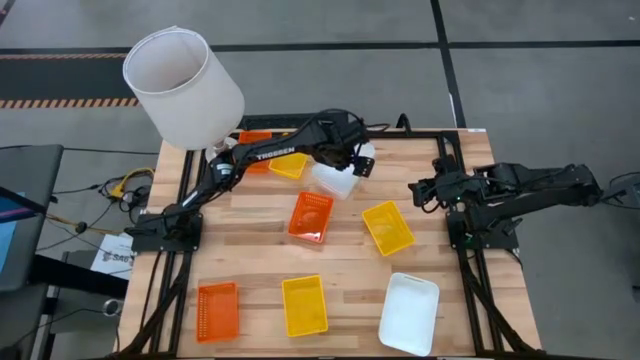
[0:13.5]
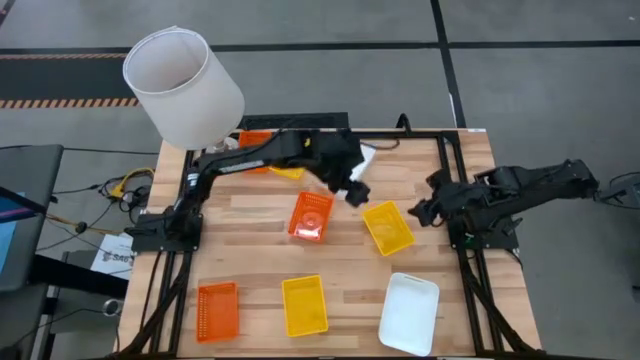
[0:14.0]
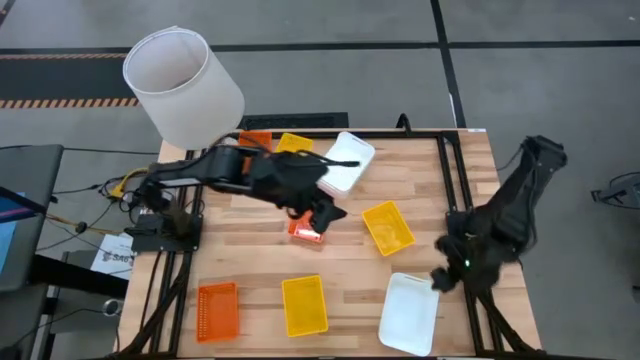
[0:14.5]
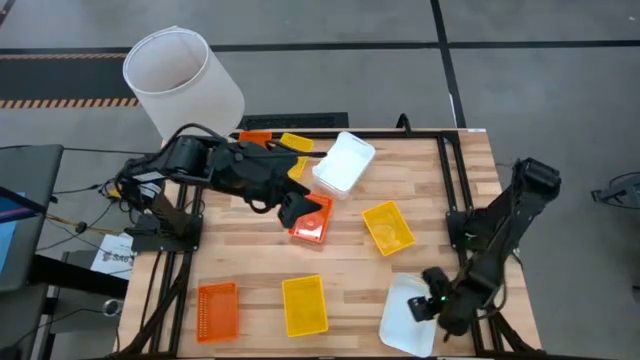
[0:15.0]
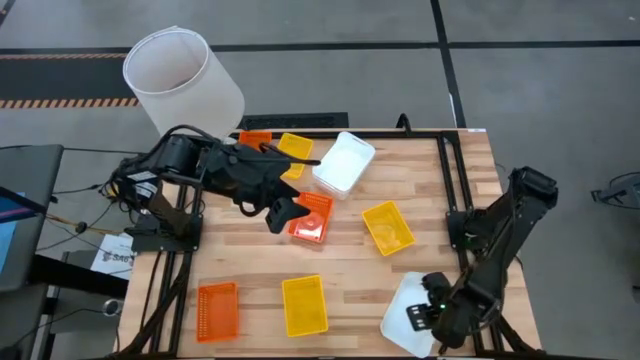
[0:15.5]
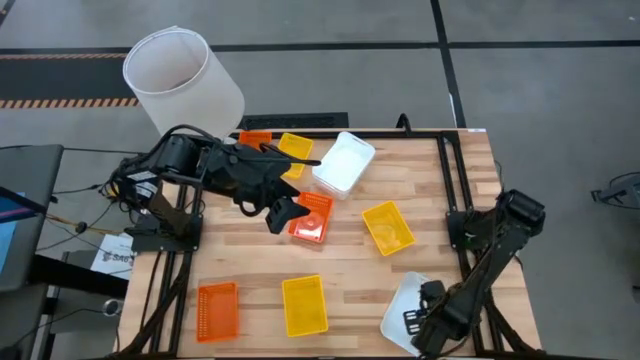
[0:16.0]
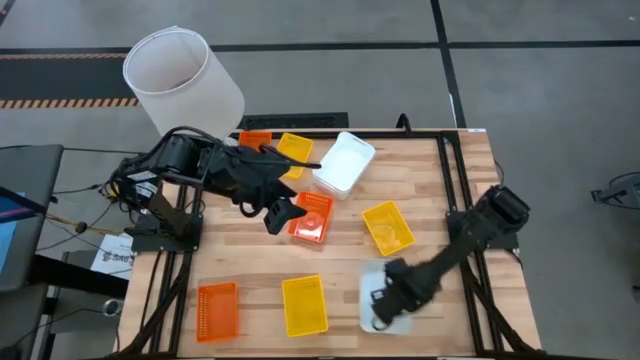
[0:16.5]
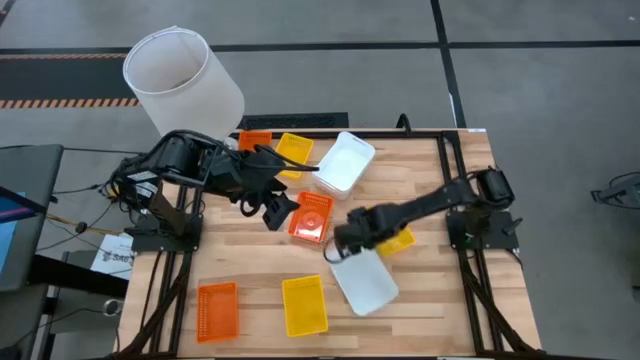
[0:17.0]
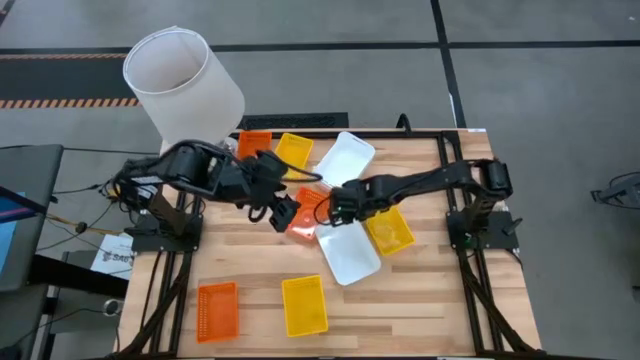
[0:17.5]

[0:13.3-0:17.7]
Move the bottom white bin to the center of the table

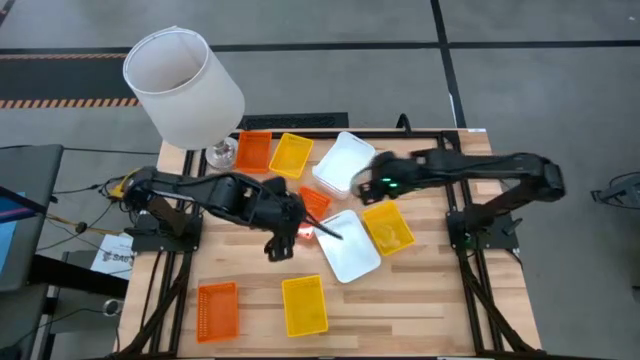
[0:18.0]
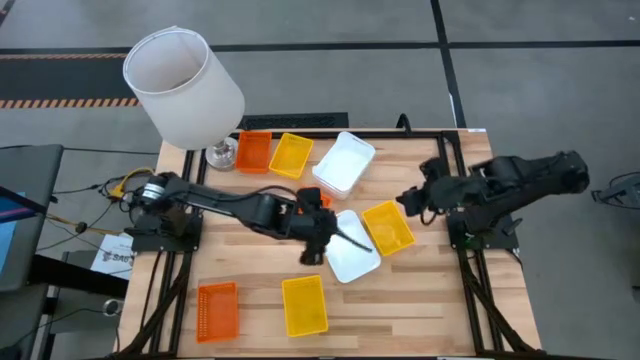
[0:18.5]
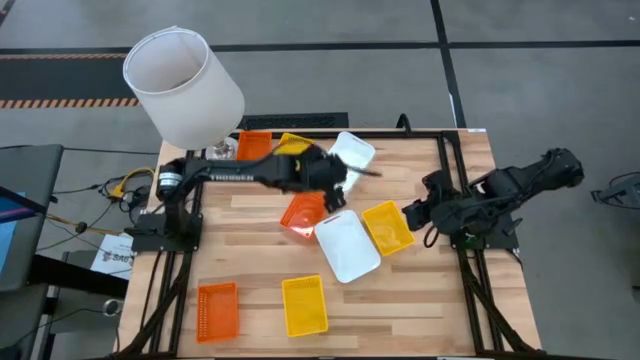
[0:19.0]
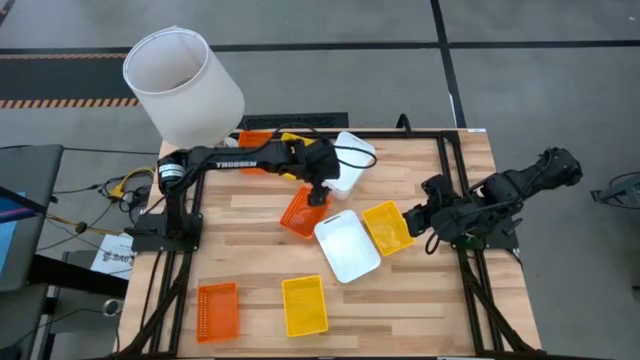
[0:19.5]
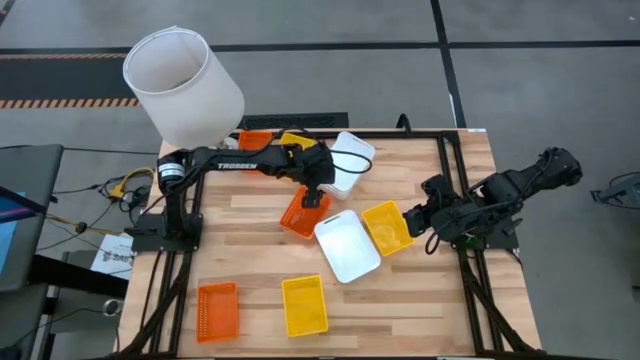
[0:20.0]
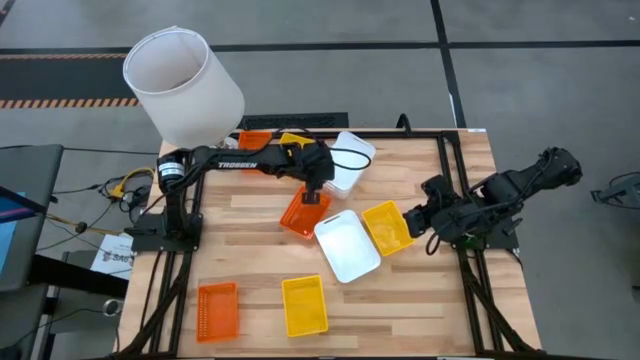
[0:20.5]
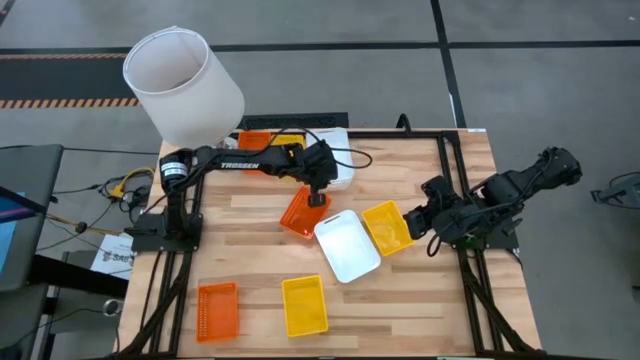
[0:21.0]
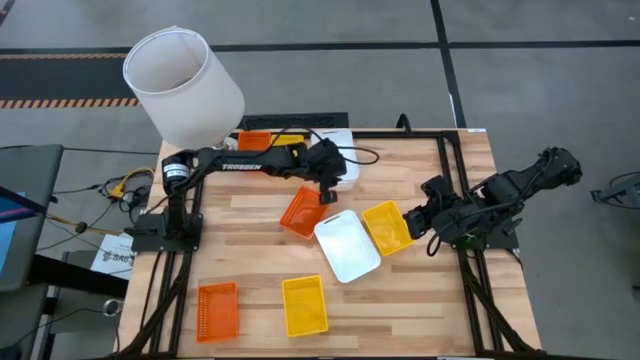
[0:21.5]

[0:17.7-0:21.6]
Adjust the stacked white bins on the table

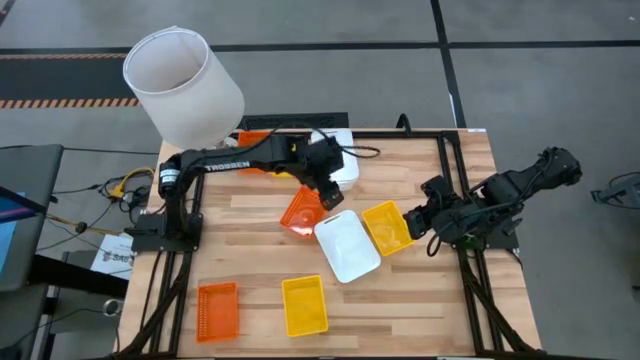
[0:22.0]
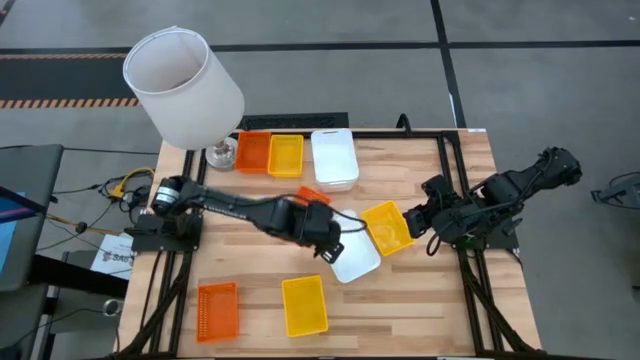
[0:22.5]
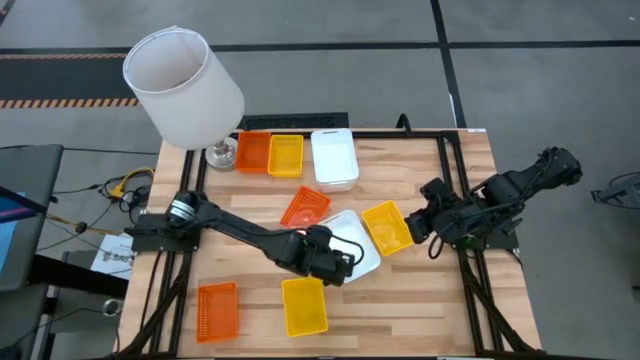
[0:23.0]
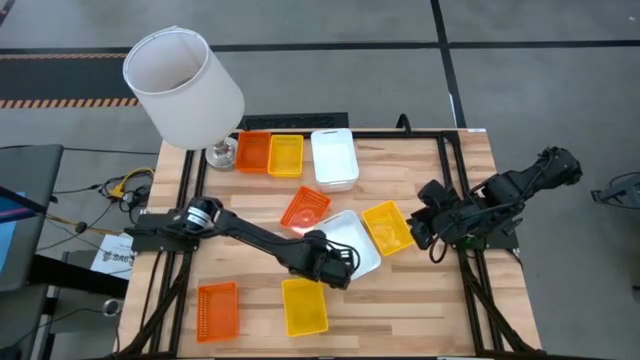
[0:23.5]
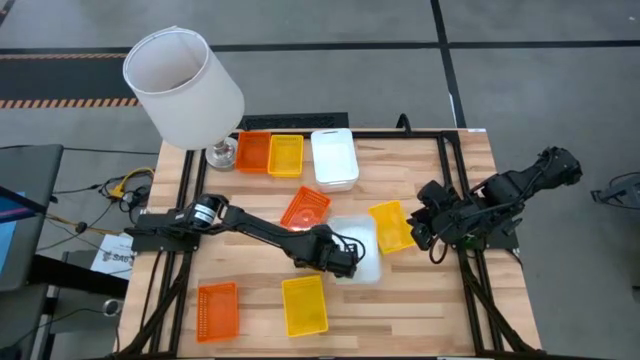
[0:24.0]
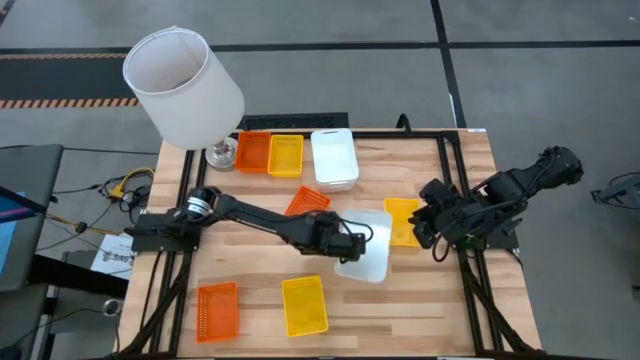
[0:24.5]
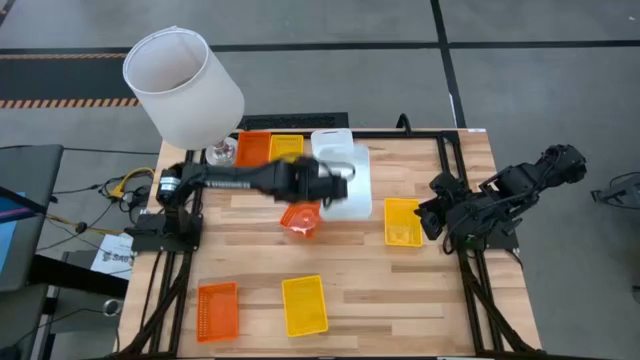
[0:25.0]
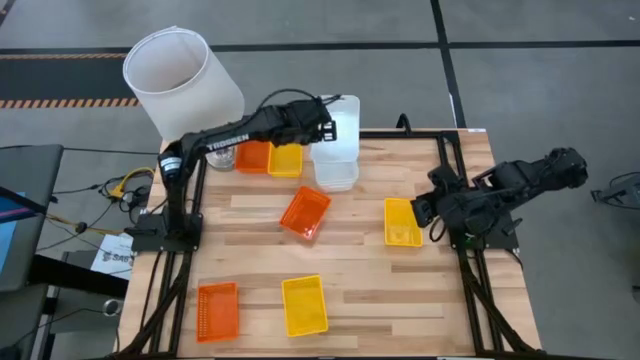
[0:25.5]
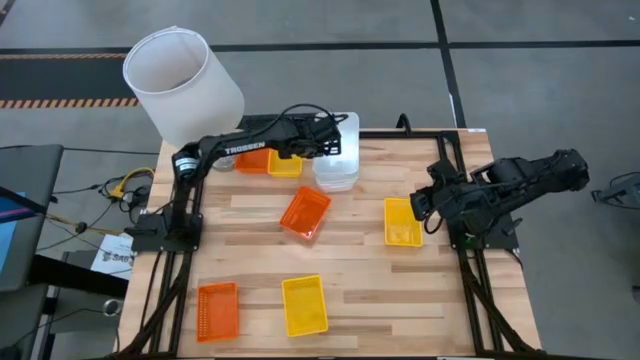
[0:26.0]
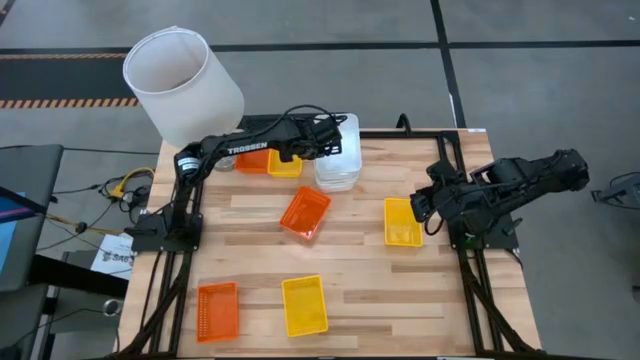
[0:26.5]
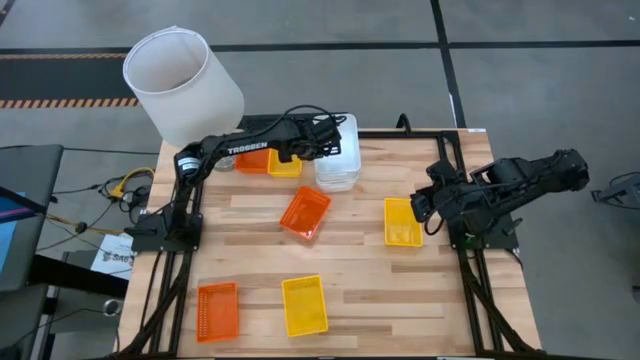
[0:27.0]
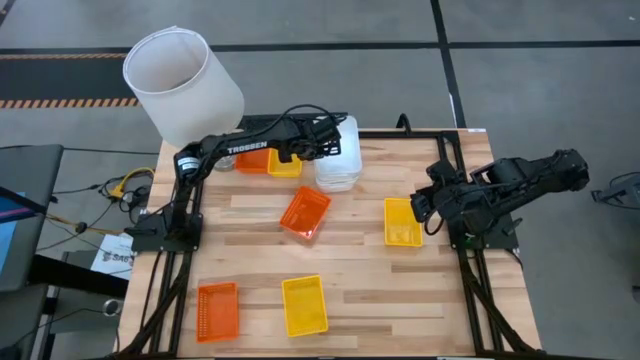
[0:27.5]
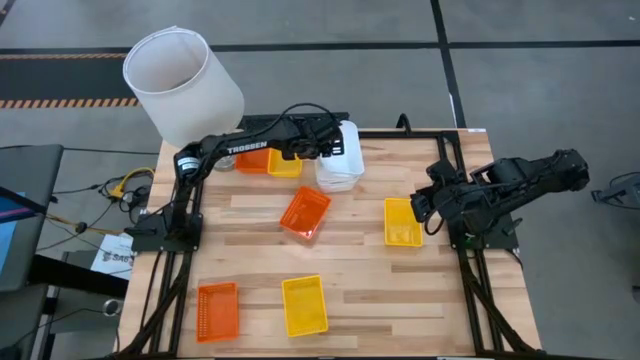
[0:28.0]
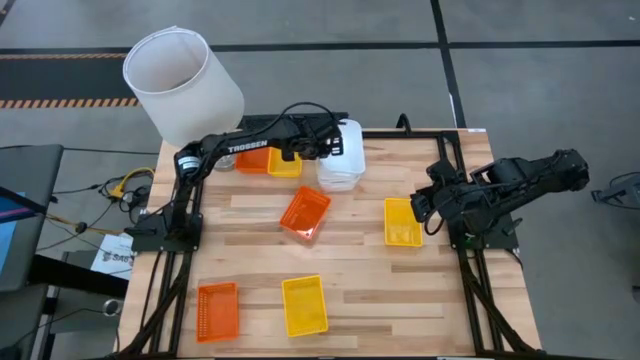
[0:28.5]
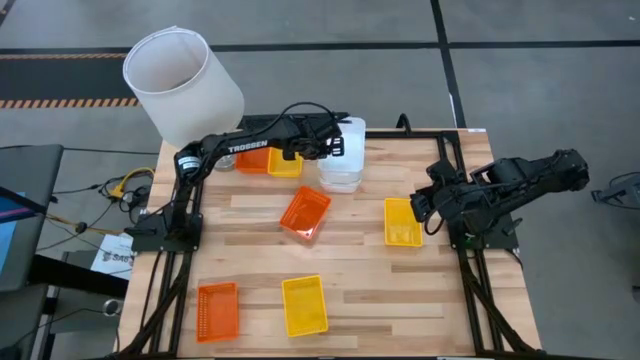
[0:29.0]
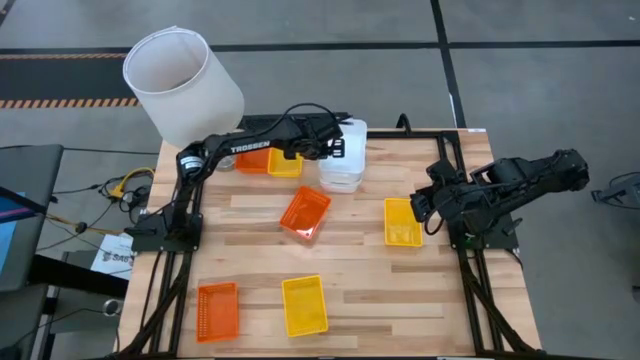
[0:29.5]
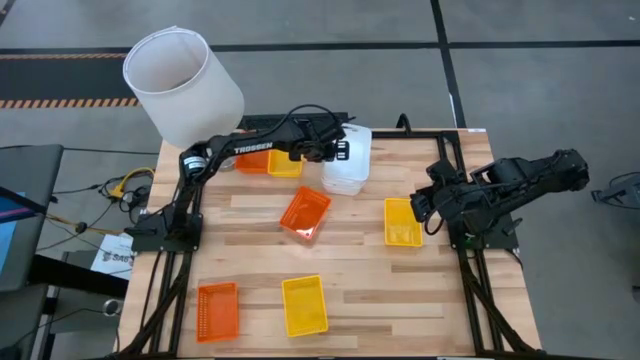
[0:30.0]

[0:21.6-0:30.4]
Stack the bottom white bin on top of the top white bin

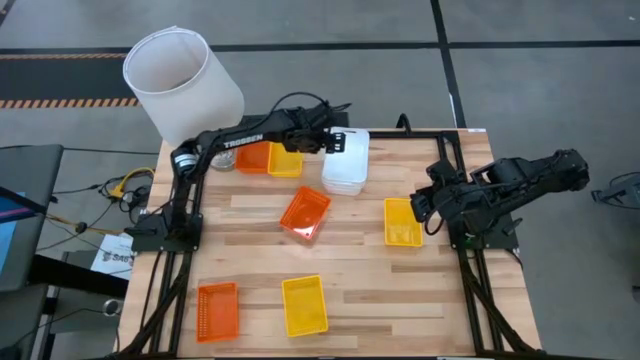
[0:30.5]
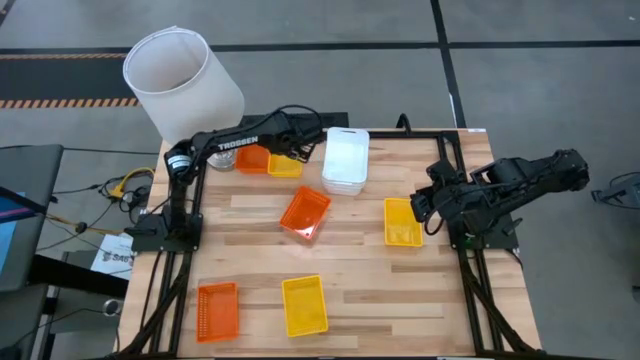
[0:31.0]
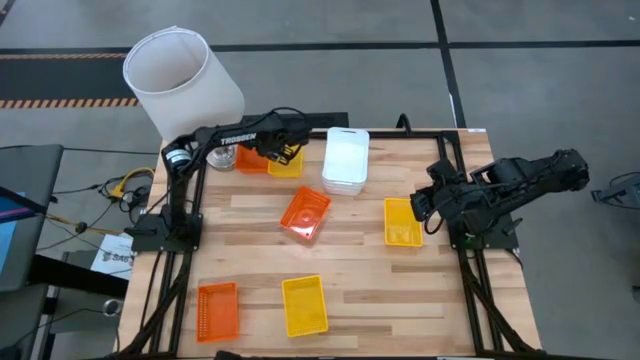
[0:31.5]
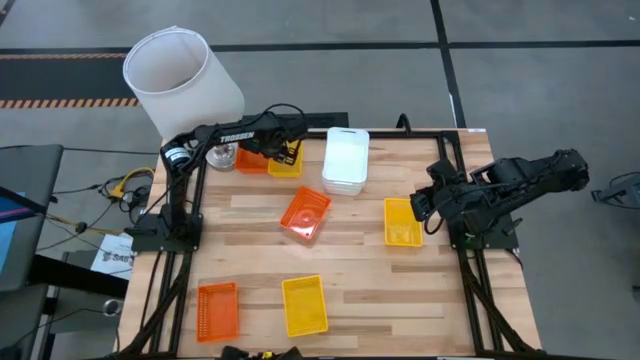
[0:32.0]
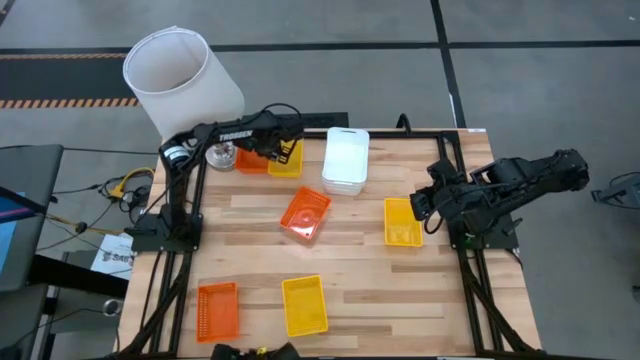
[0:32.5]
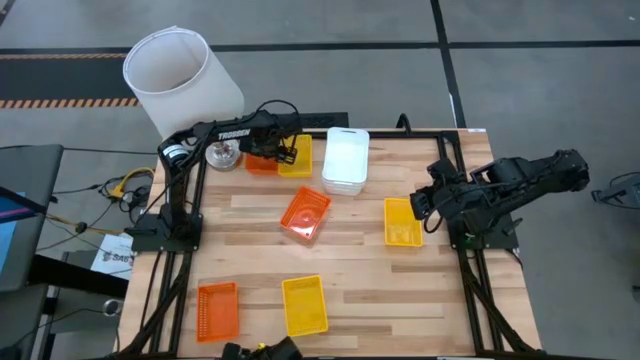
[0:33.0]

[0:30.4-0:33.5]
Adjust the top orange bin on the table
